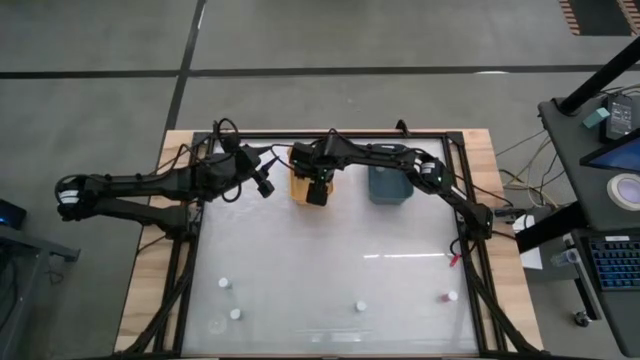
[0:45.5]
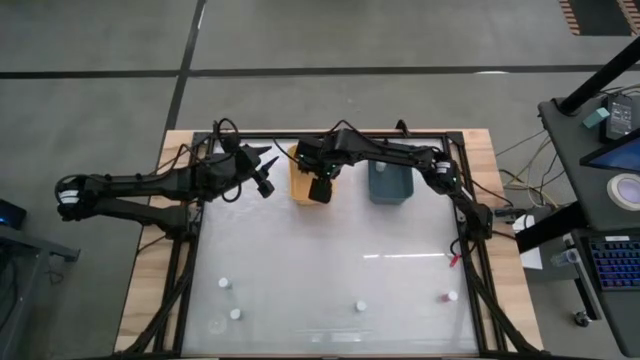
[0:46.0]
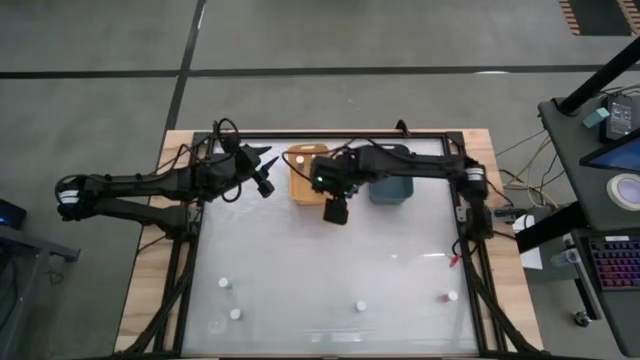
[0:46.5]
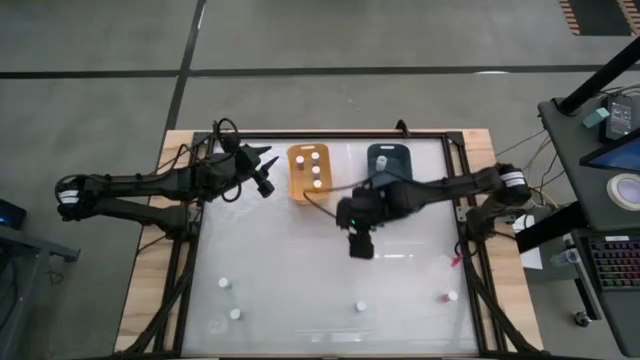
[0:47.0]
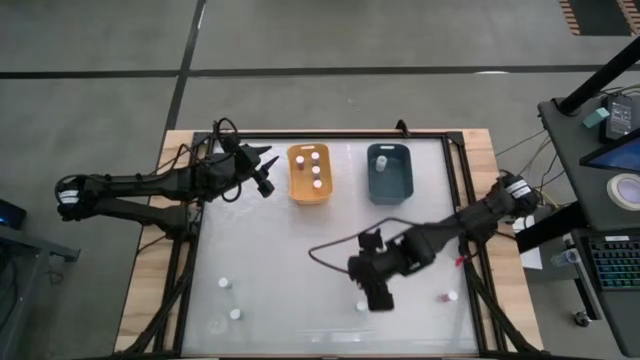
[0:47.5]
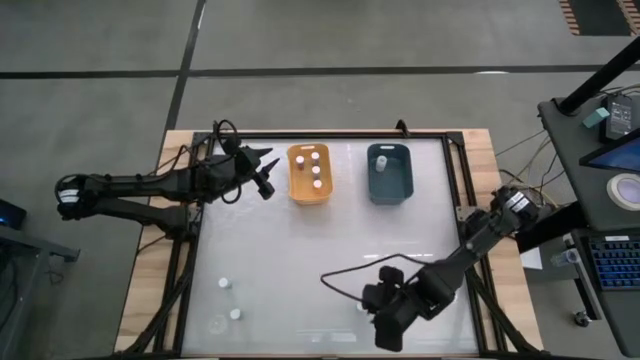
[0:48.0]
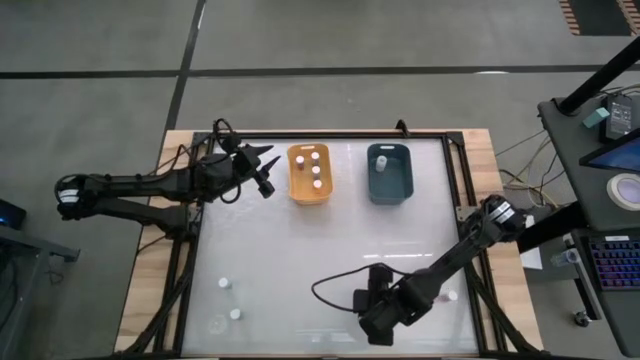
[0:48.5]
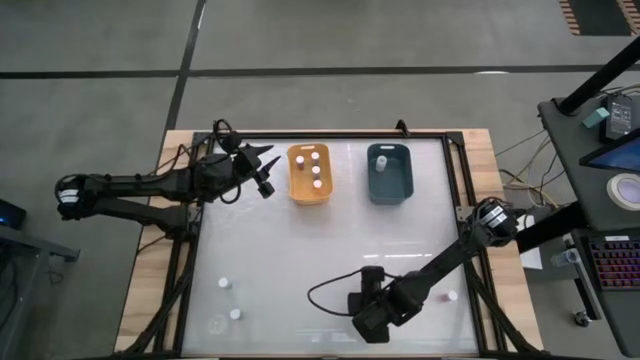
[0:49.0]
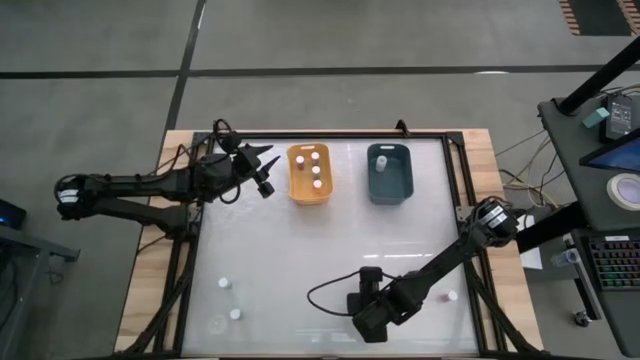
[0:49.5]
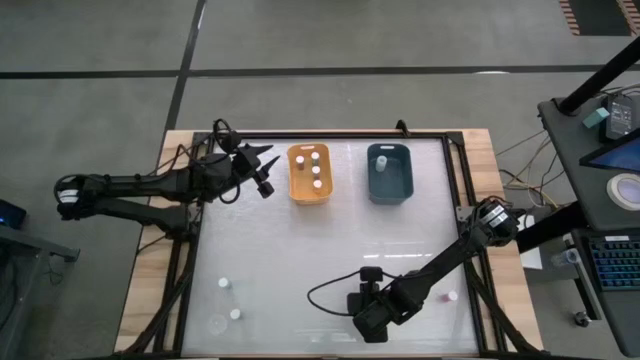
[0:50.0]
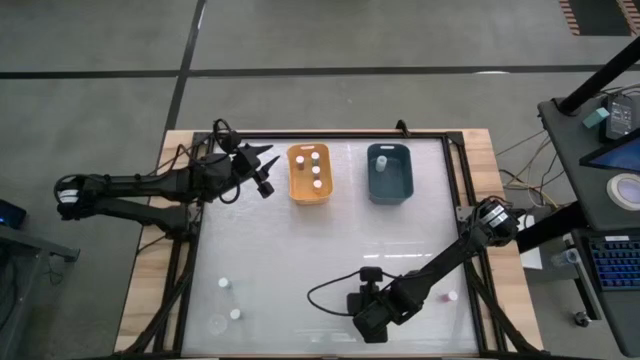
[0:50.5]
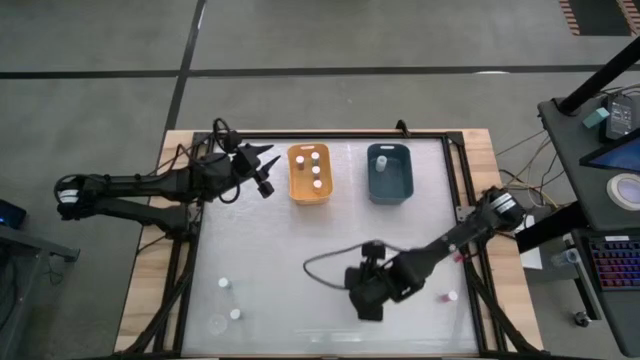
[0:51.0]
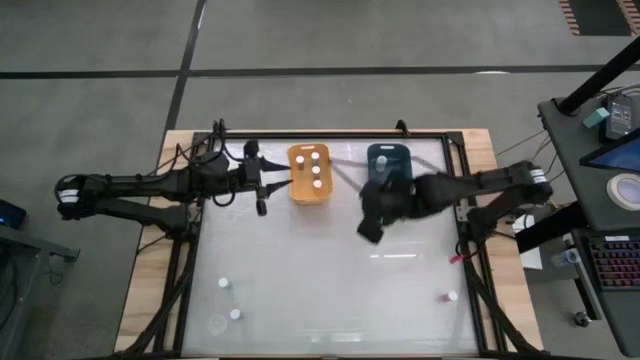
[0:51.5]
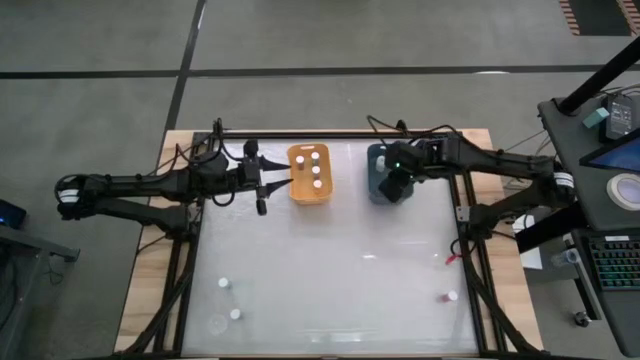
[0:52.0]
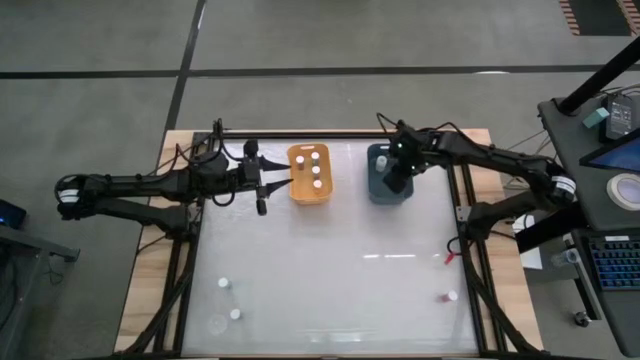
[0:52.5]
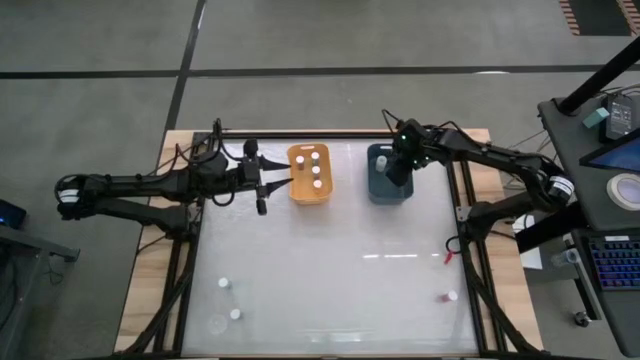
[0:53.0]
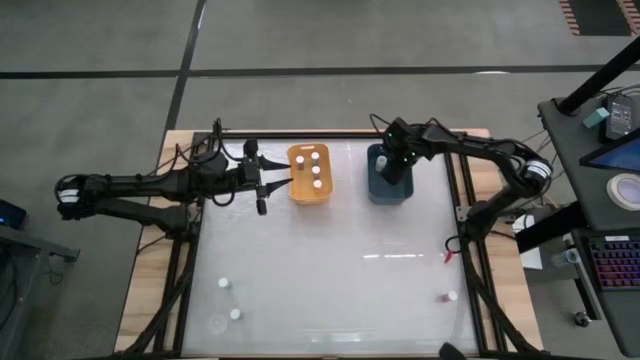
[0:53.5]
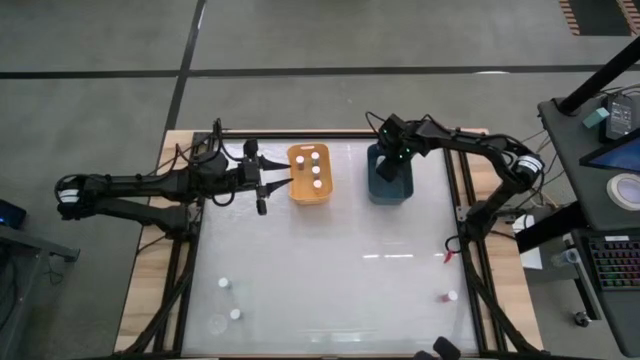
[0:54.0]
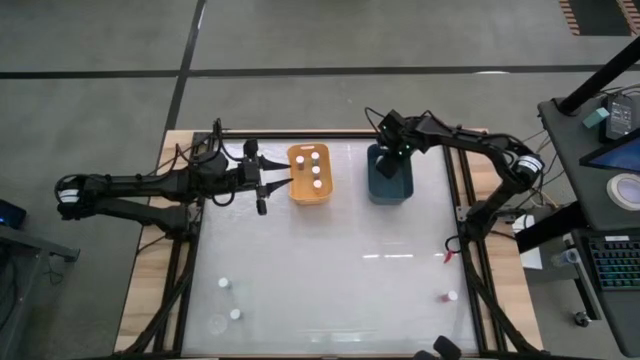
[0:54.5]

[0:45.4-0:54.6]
Task: Pick and place medicine bottles into bin by pill shape (circle, oval)
Put the blue tablet bottle into the green bin

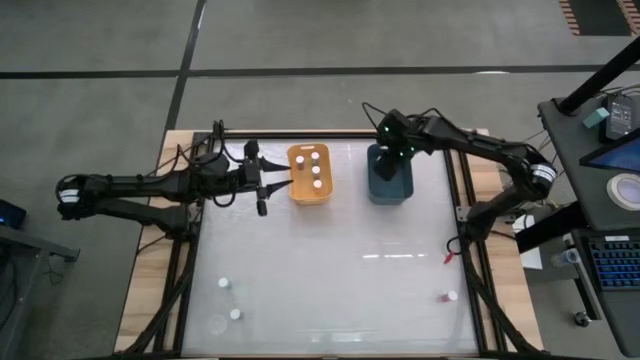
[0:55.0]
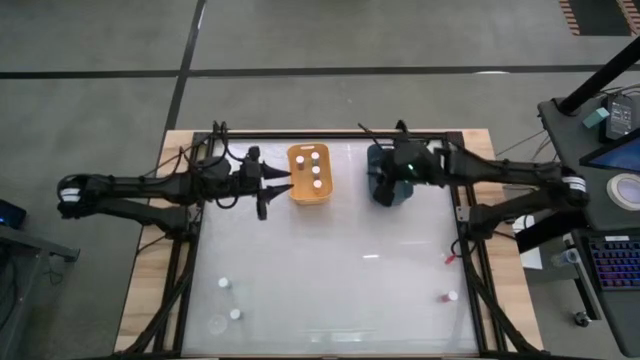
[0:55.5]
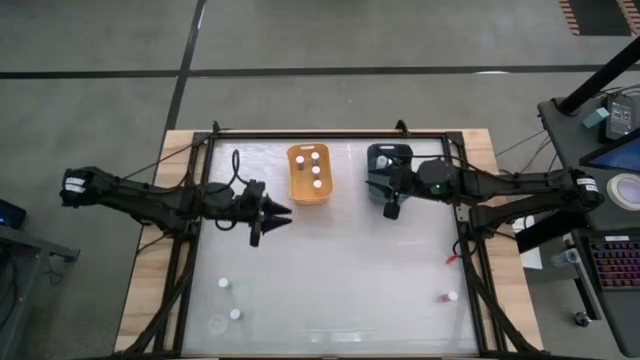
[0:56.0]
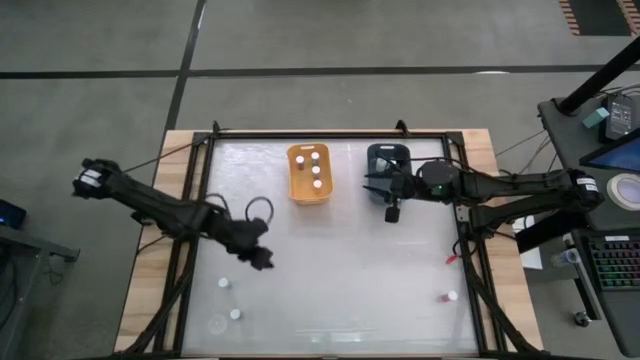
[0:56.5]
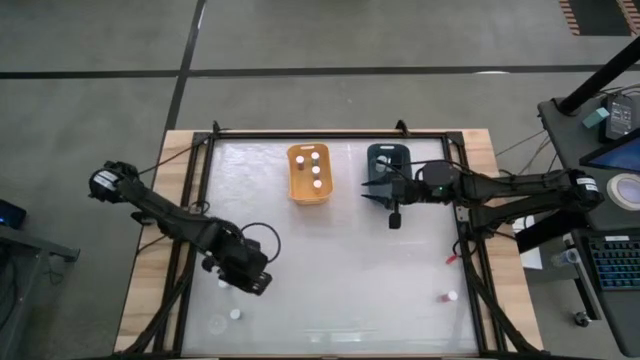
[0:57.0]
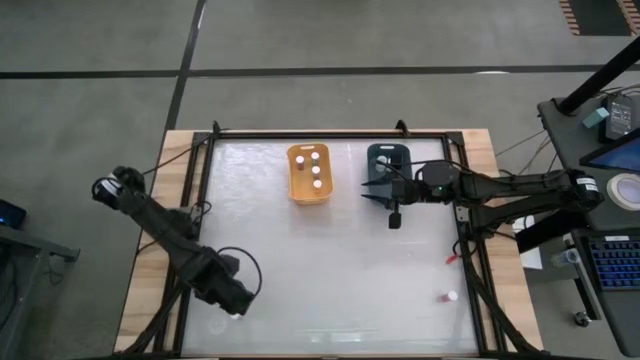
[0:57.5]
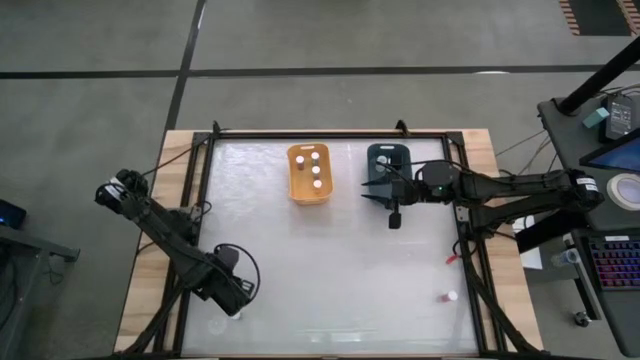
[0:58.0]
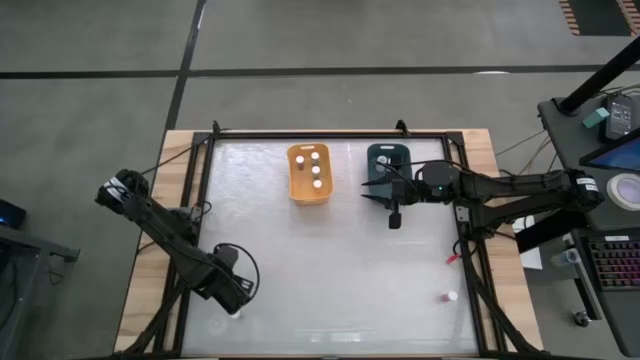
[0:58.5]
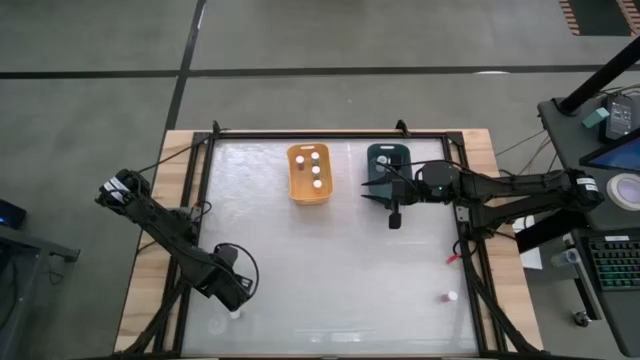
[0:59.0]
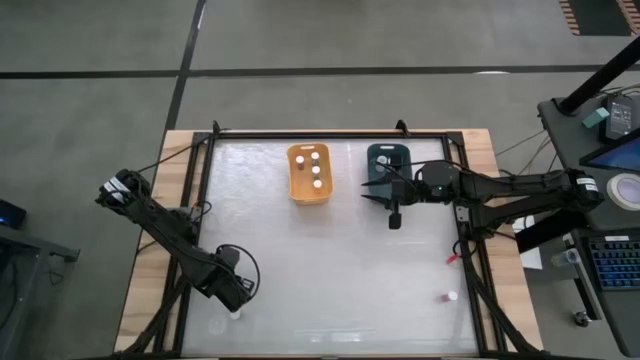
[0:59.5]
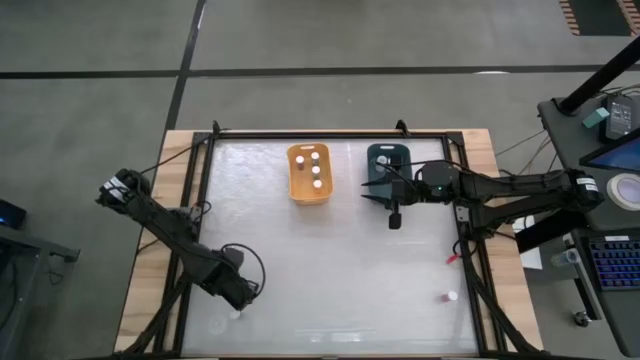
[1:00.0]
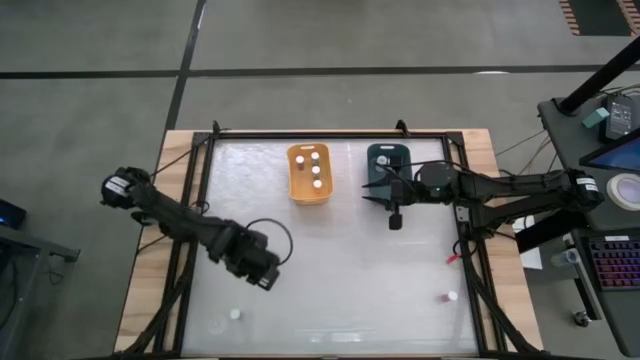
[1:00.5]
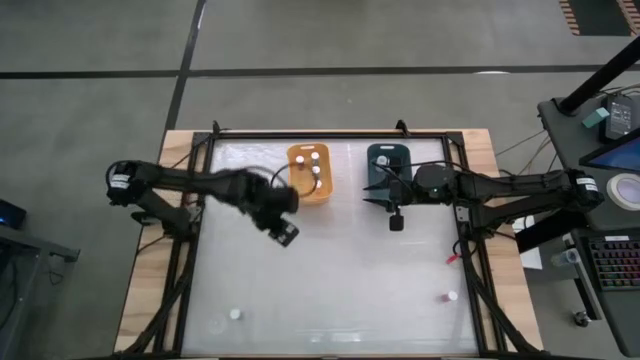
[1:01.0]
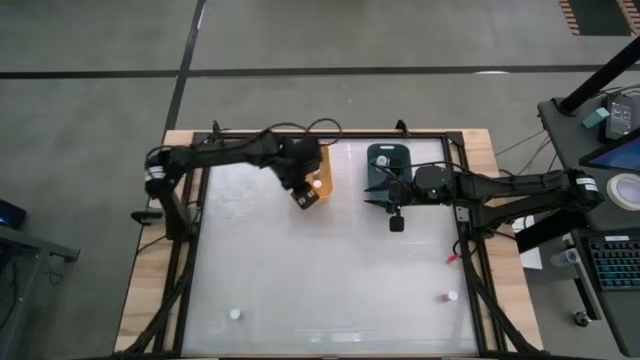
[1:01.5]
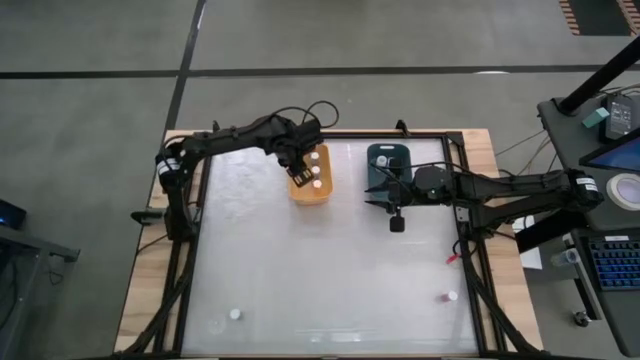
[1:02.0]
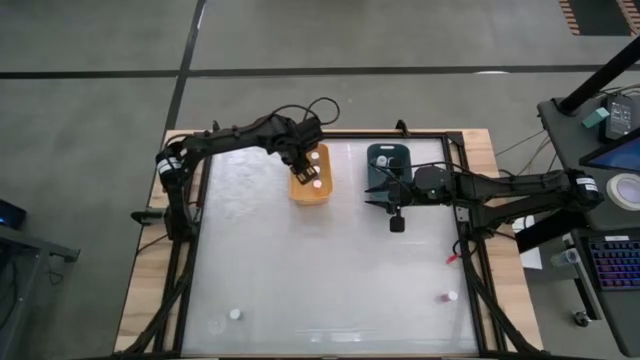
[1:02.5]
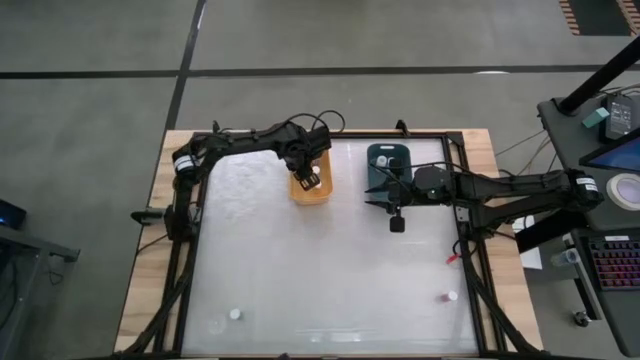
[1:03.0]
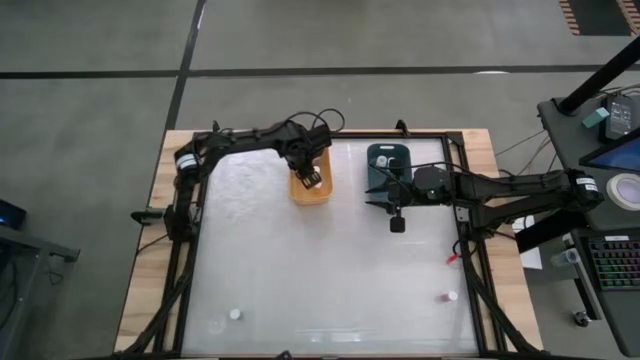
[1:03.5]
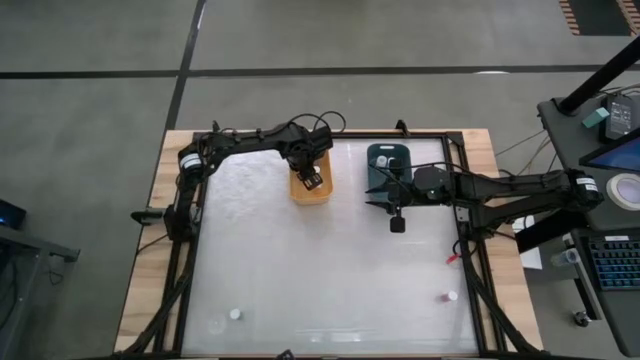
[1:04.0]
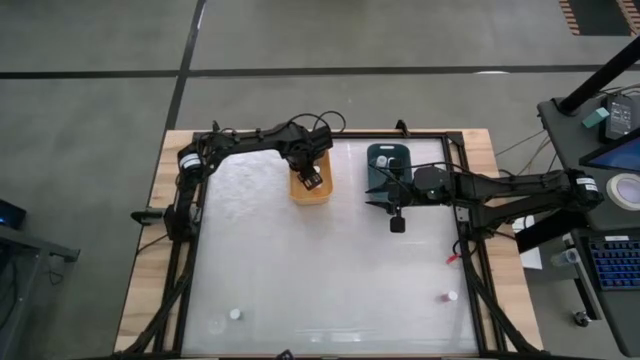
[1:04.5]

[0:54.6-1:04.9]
Put the top blue capsule bottle into the yellow bin

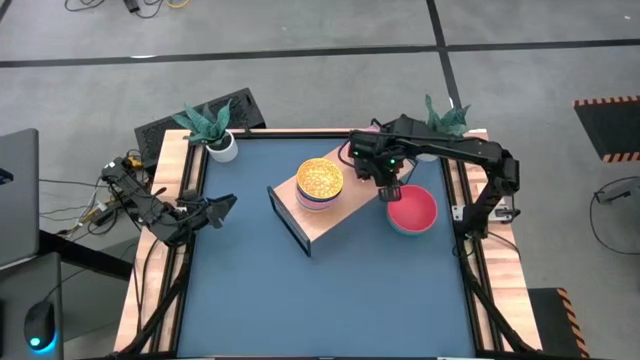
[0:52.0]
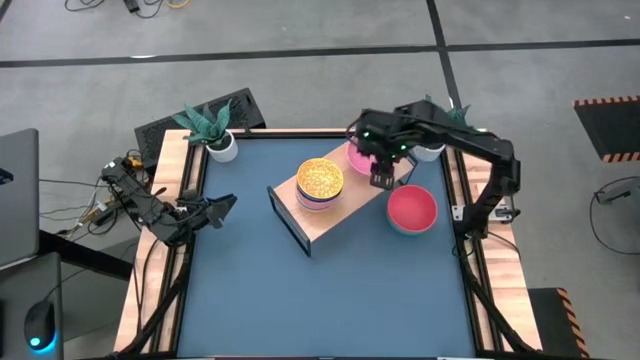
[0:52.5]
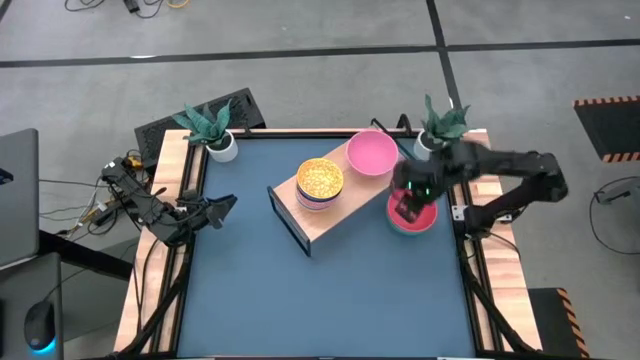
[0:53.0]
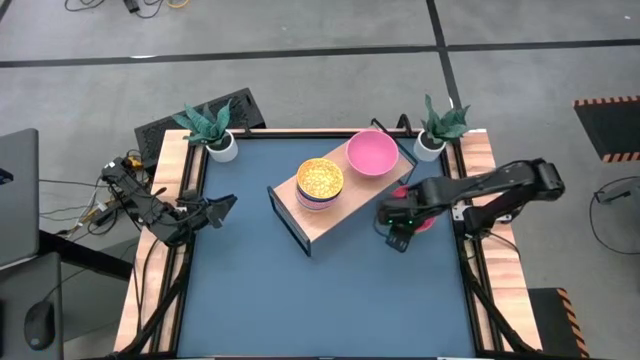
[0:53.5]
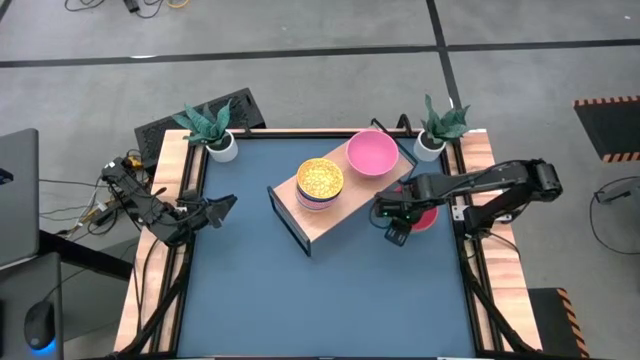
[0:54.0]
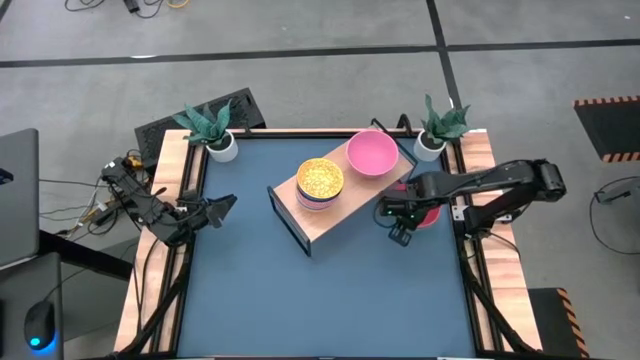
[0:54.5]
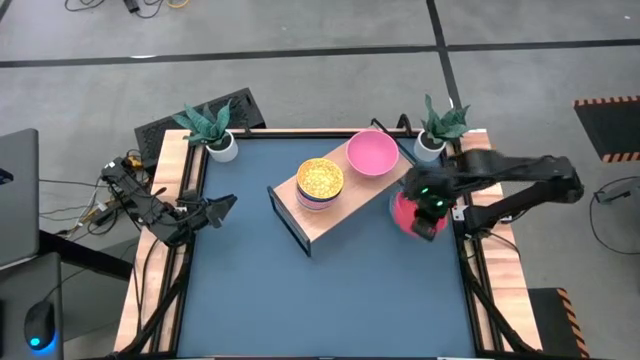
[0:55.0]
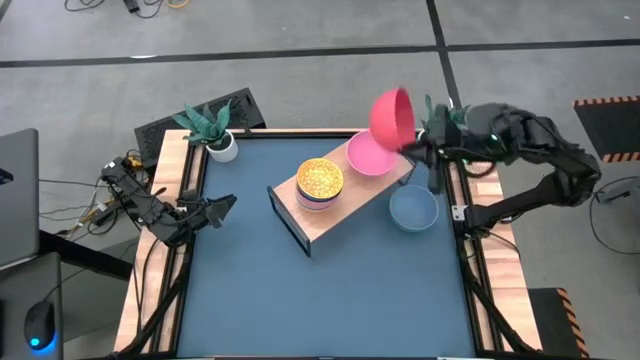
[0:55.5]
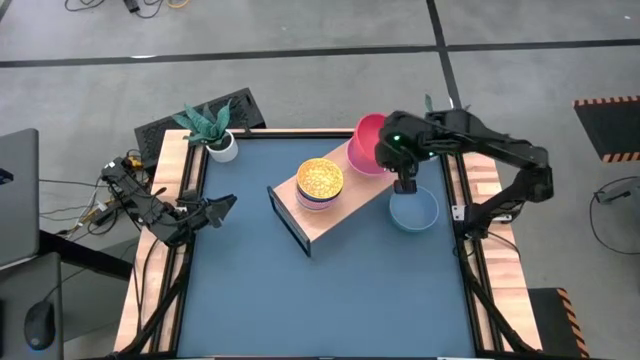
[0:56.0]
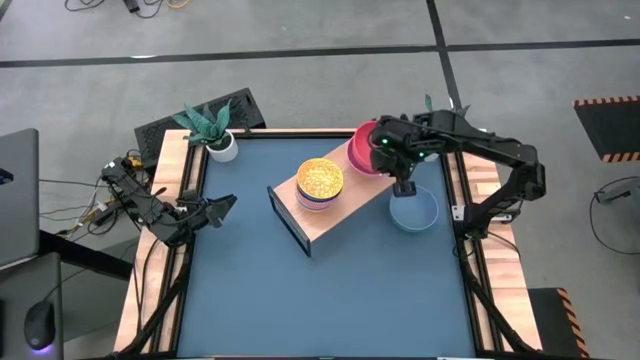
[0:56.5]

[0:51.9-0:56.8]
Task: Place and stack bowls onto a shelf
Stack the red bowl on top of the pink bowl on the shelf
